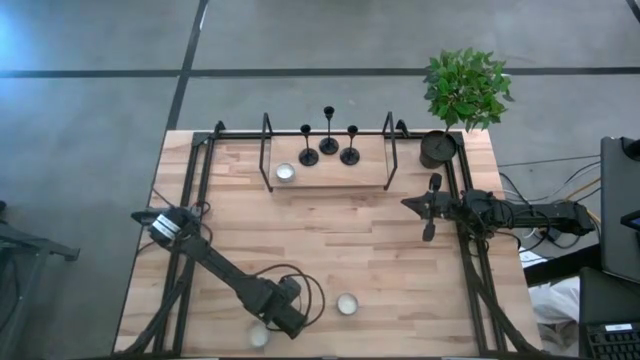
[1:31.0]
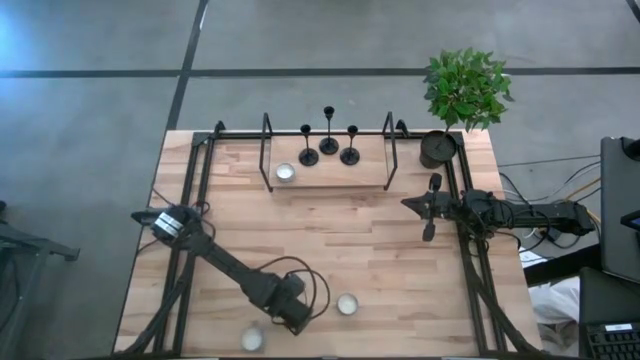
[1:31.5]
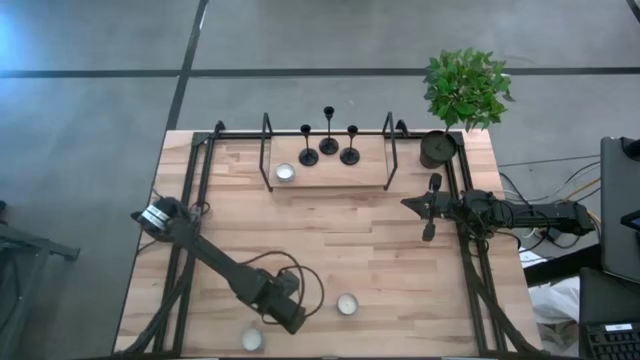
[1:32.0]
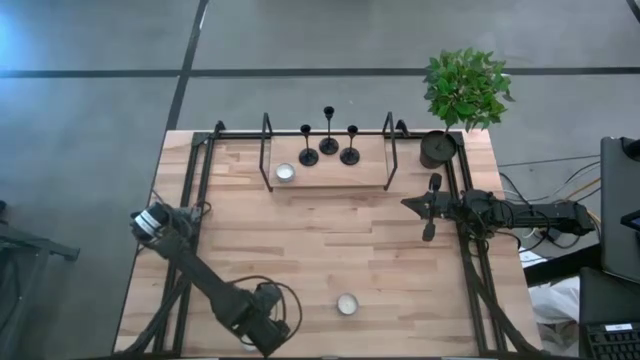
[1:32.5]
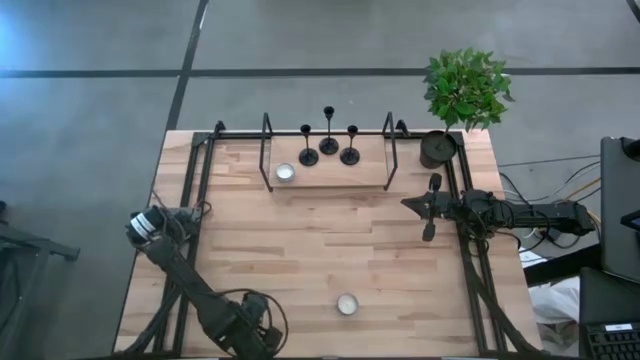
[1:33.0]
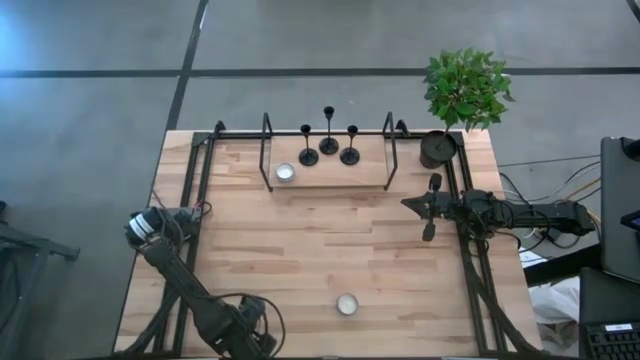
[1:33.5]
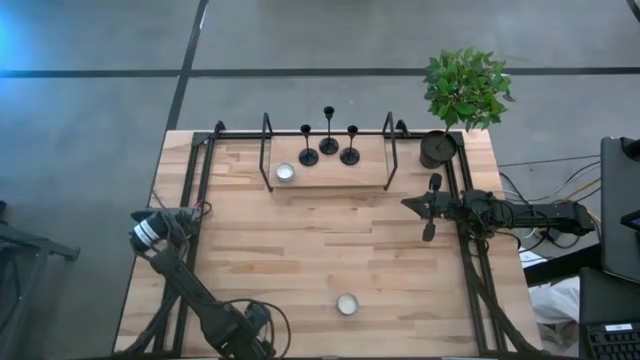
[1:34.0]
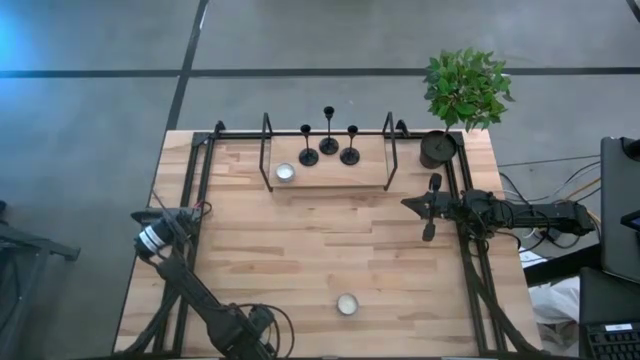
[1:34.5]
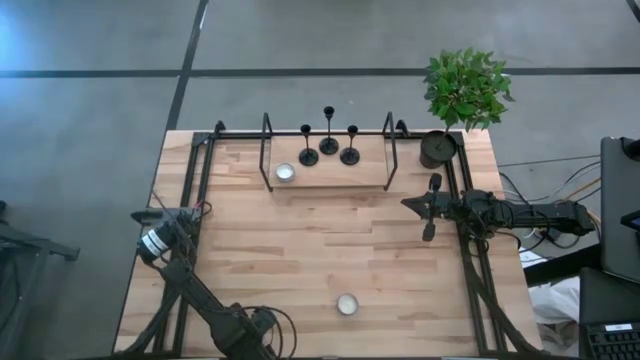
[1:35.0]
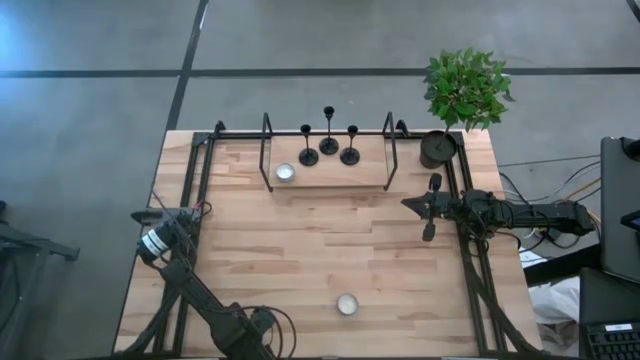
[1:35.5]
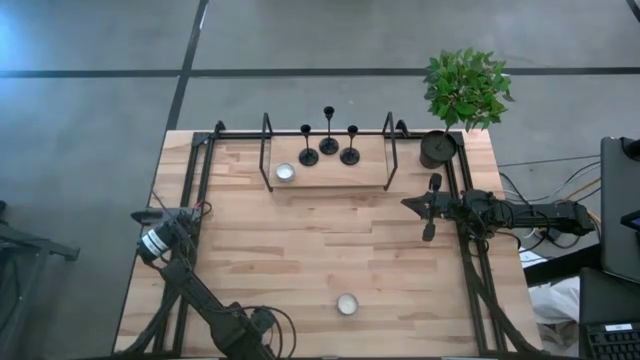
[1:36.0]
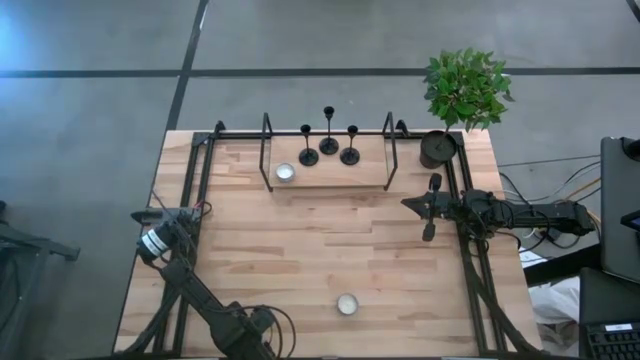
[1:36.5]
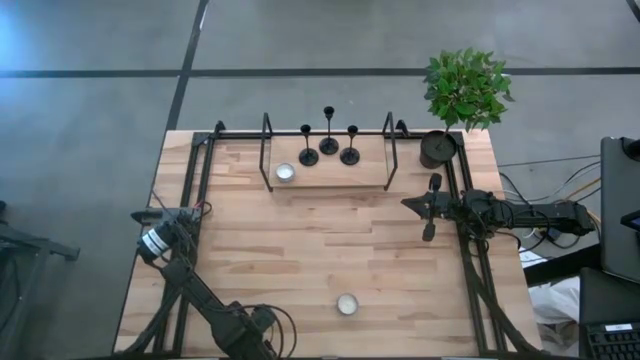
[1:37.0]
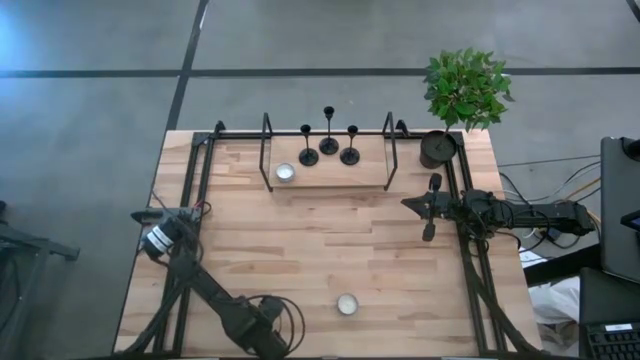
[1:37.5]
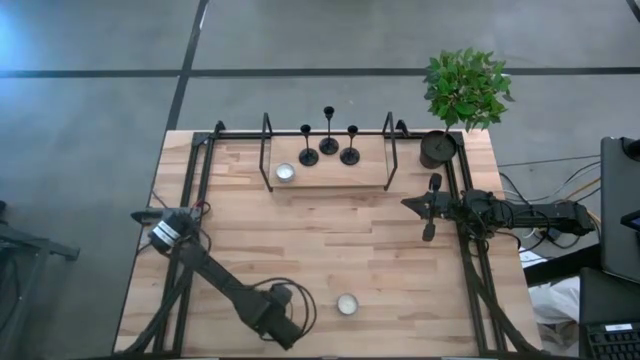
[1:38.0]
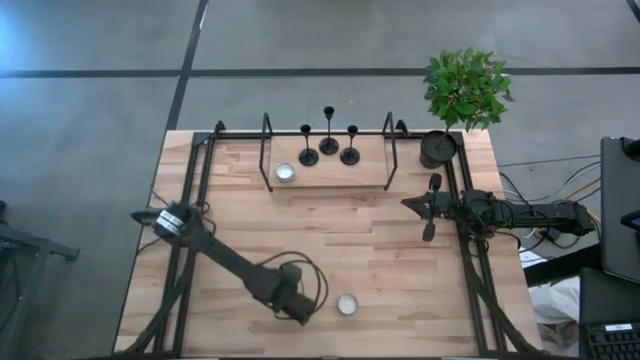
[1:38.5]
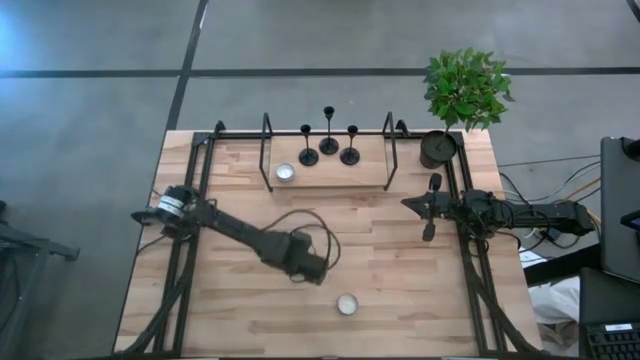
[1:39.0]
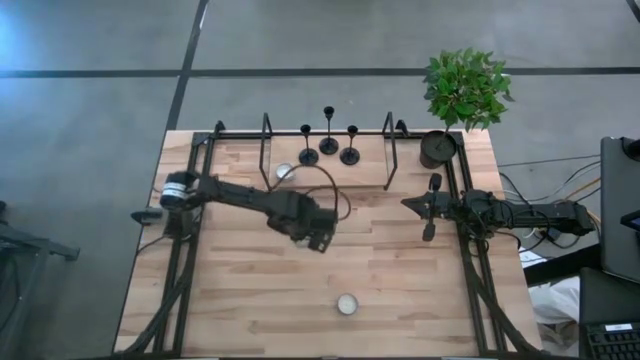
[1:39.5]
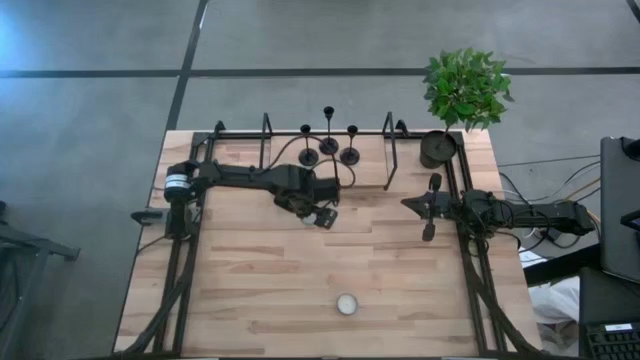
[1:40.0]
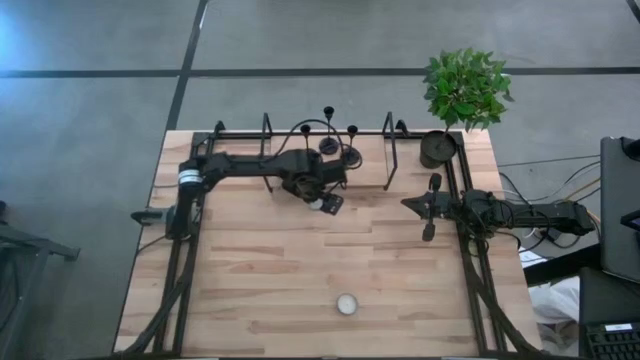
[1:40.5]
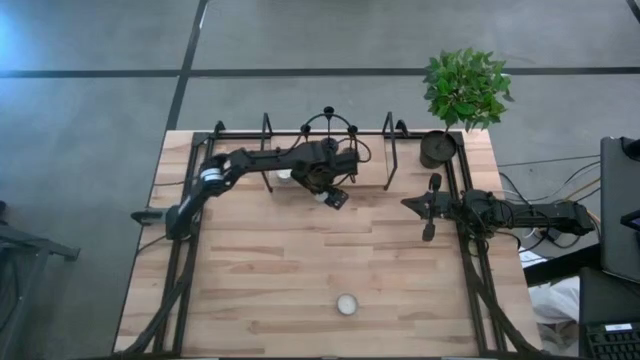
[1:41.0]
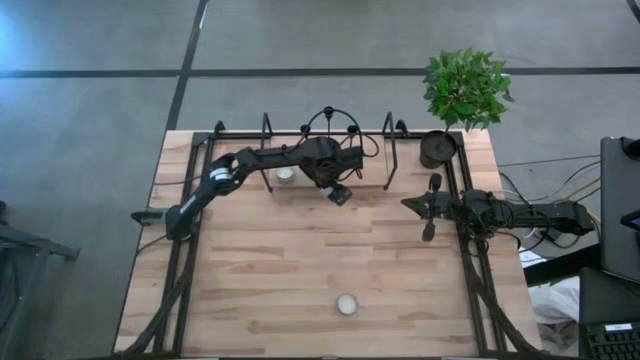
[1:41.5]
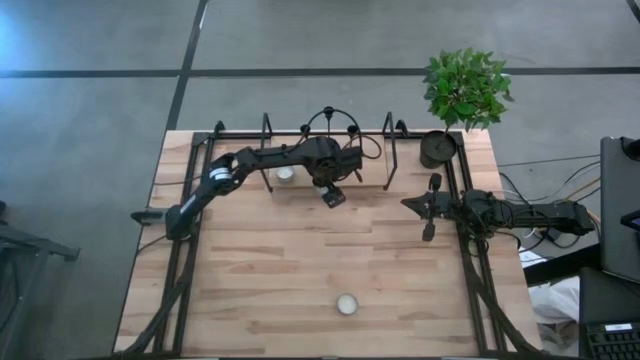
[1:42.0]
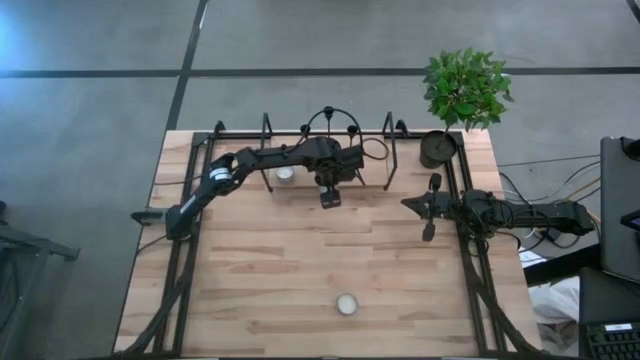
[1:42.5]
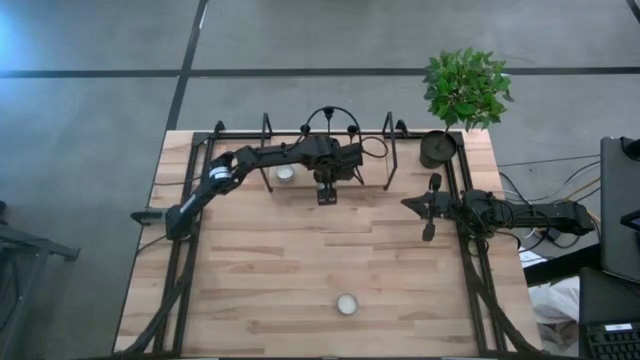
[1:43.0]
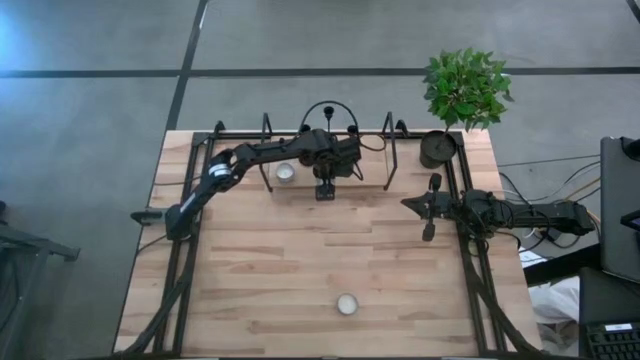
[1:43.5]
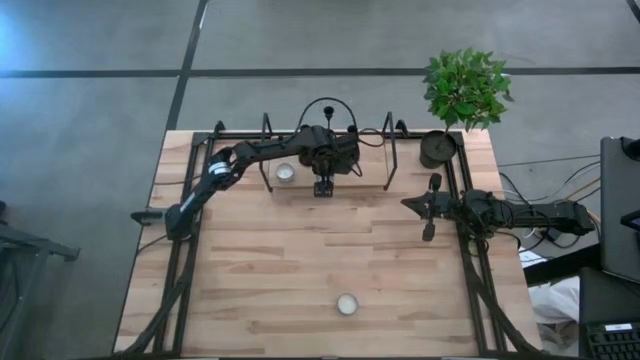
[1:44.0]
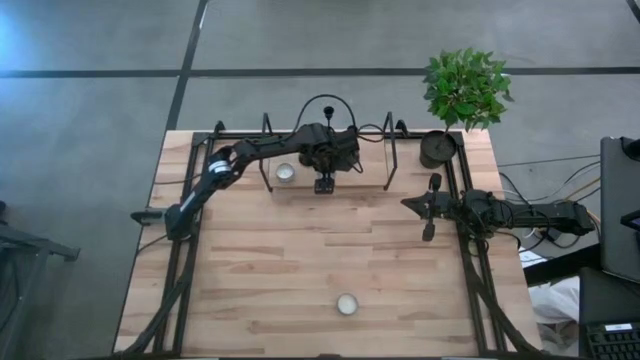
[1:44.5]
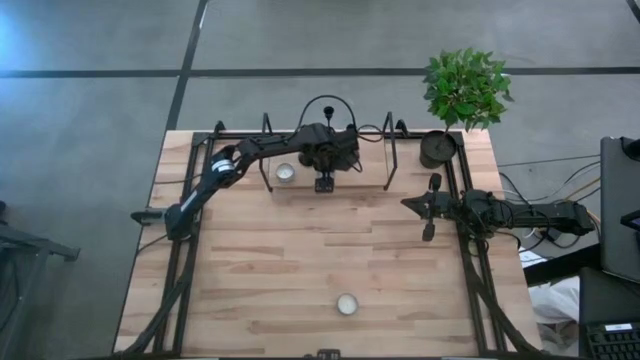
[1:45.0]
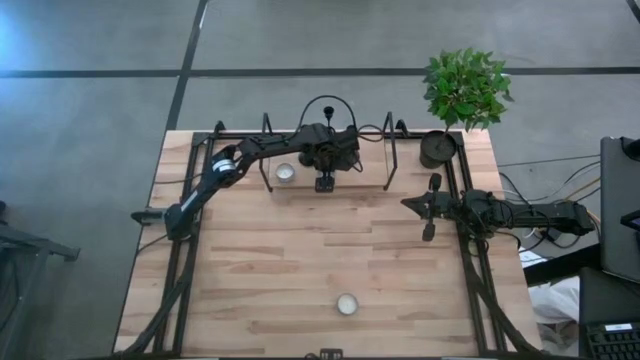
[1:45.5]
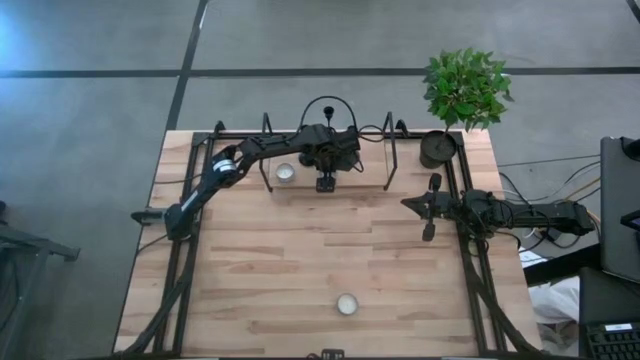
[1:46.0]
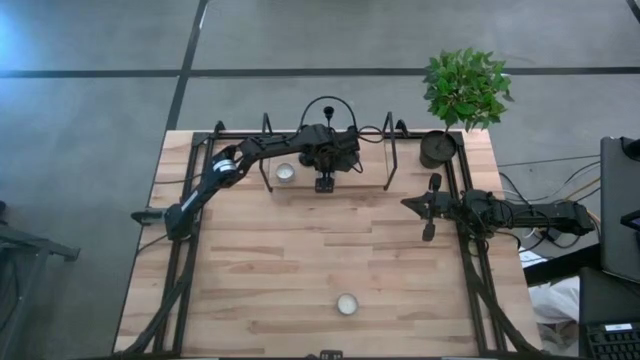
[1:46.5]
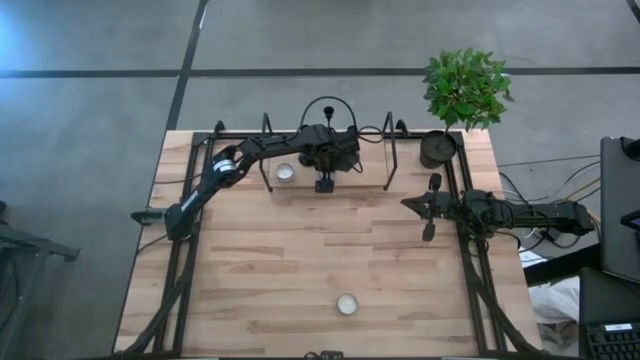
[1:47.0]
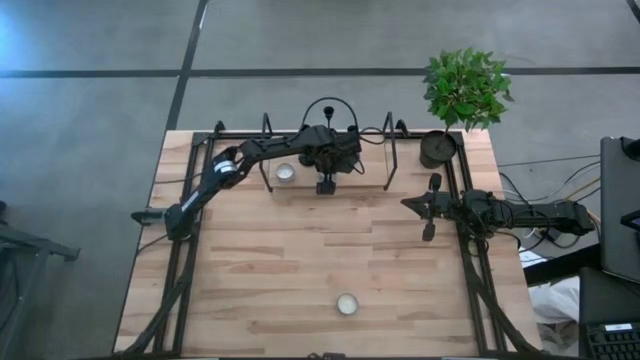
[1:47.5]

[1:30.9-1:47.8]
Task: Pick & Place candle stick holders
Put the blue scented candle on the shelf
